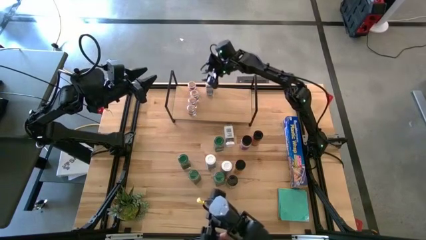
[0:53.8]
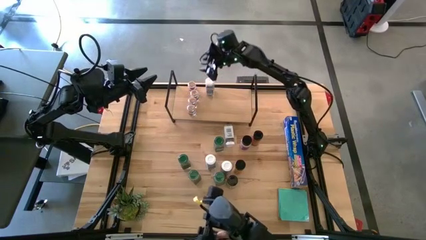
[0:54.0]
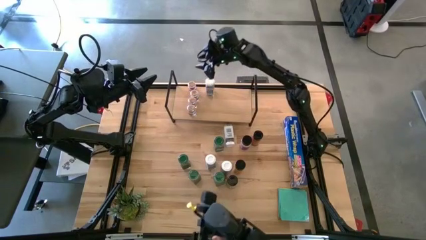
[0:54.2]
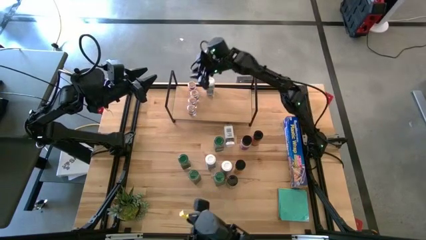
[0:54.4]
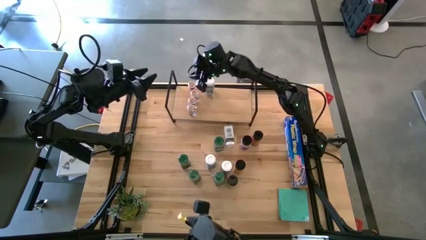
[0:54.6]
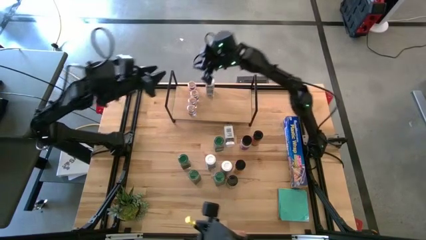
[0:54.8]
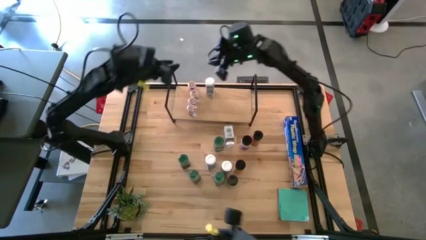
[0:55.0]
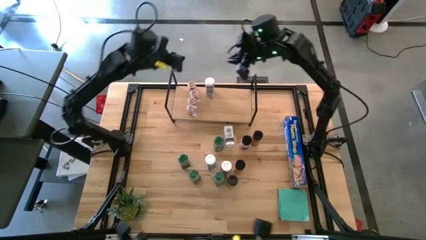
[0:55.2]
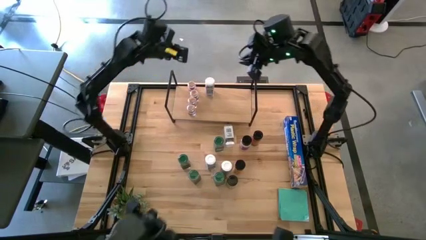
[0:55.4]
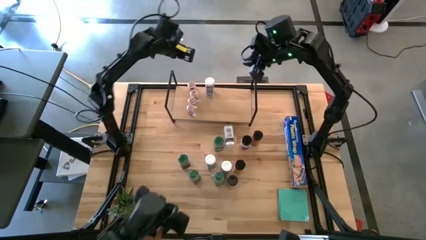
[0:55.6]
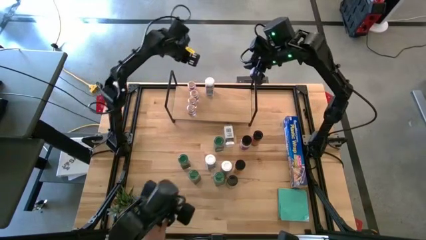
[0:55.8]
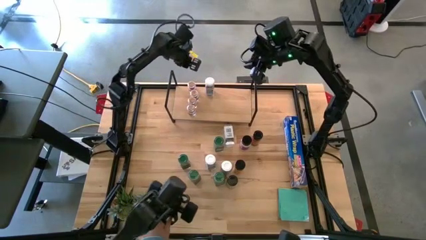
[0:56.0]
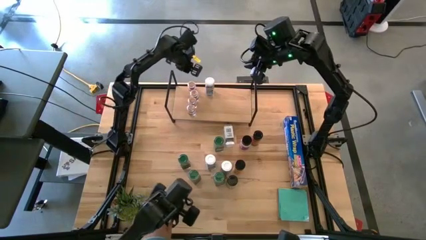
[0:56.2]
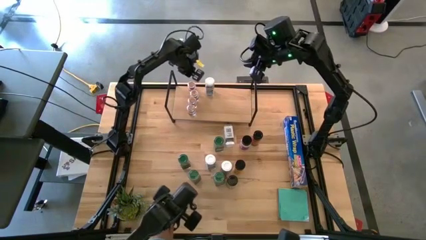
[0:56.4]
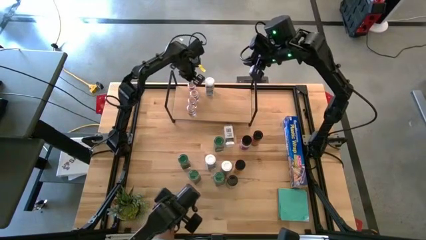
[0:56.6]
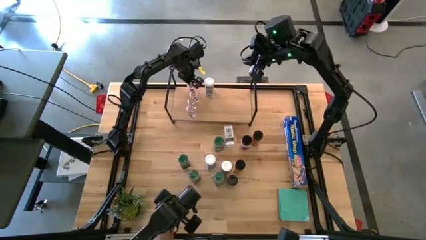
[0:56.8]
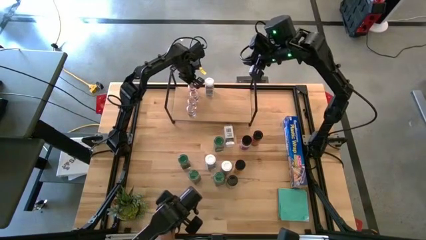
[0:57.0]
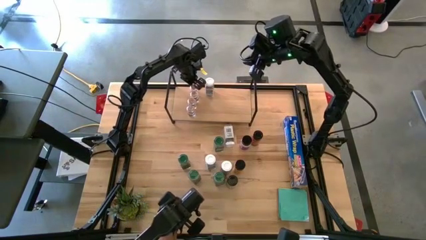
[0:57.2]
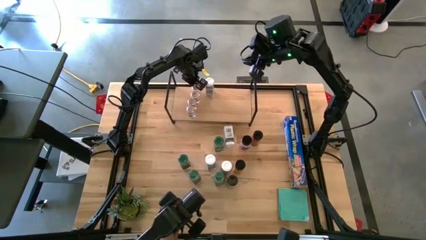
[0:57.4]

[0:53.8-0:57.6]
Task: Shelf spices
Adjust the brown seasoning bottle on the shelf

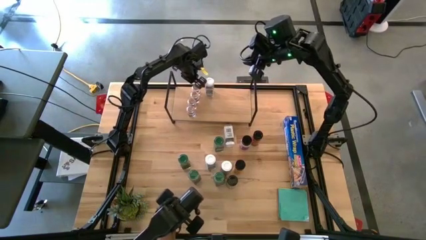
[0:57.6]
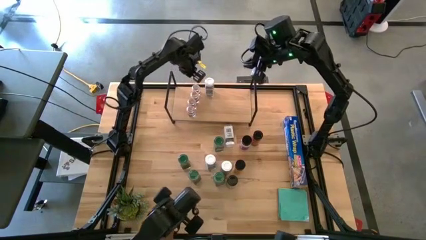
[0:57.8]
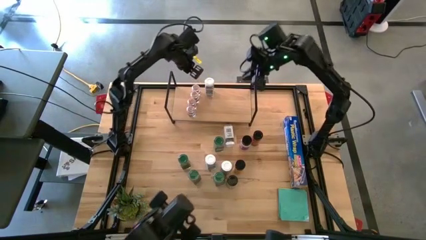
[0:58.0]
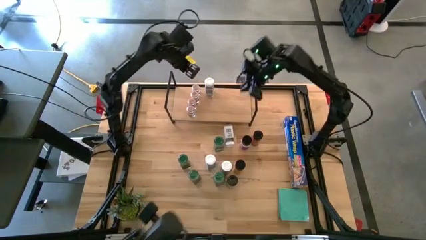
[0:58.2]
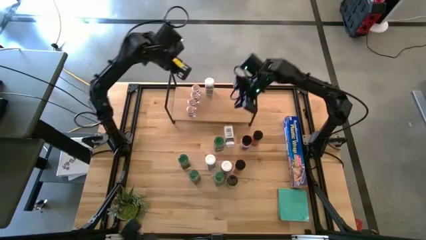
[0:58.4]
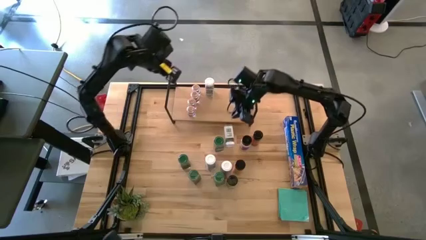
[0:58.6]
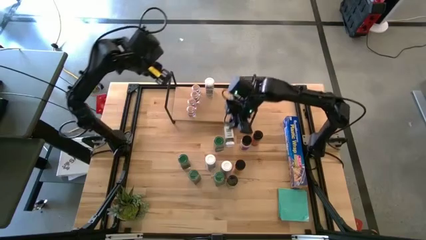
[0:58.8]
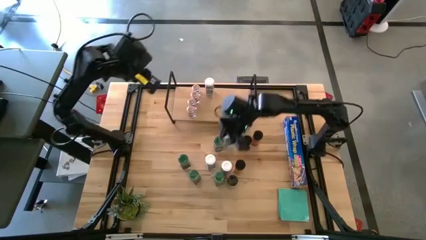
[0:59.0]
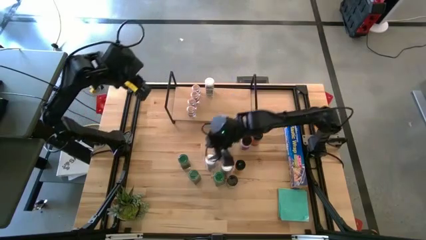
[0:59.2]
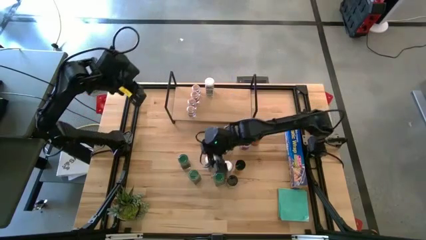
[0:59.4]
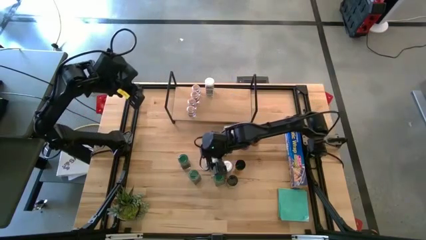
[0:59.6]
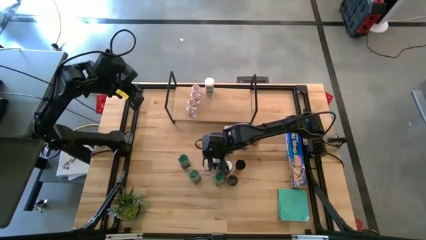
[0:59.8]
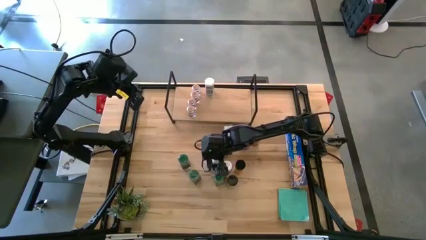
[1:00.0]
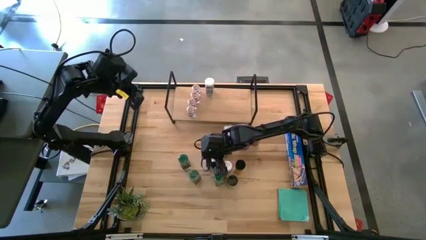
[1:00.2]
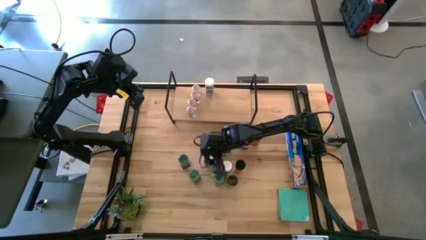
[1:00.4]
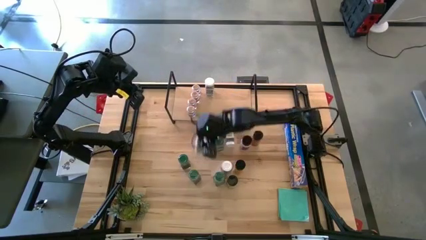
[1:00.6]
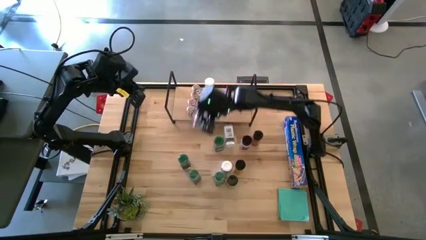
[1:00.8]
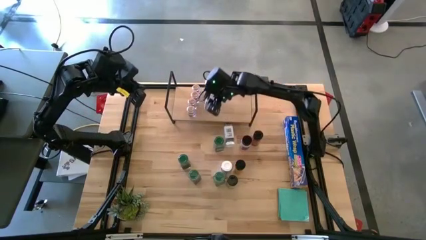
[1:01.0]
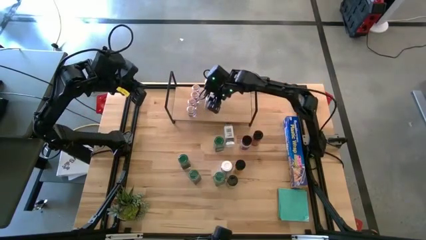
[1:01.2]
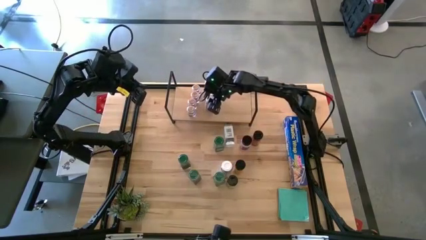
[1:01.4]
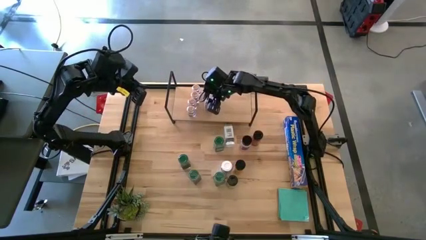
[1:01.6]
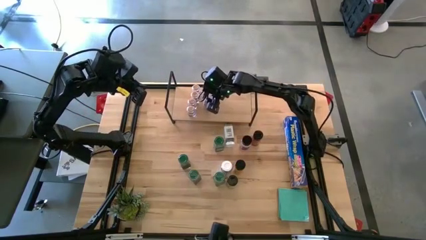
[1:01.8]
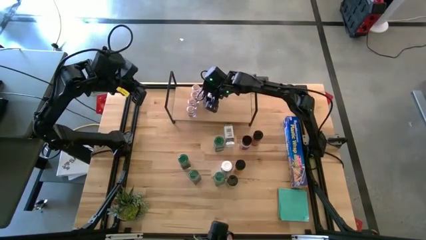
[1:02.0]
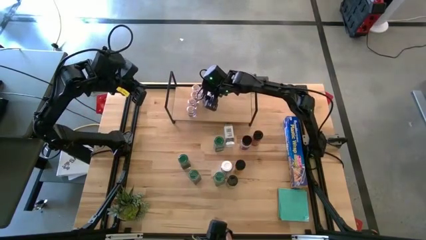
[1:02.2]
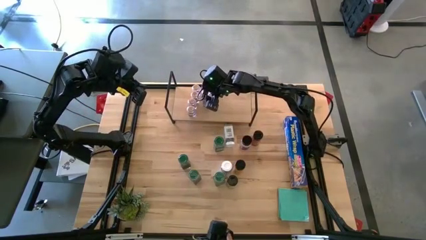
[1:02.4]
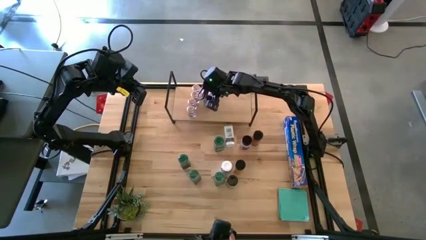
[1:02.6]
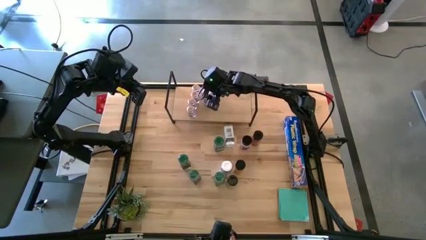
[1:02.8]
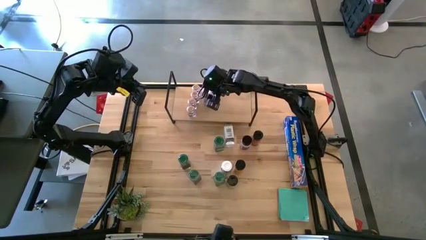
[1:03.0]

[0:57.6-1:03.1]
Put the bottom left white seasoning bottle on the shelf aligned with the other white seasoning bottle

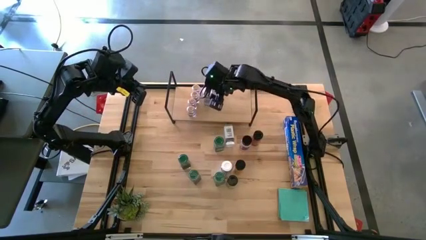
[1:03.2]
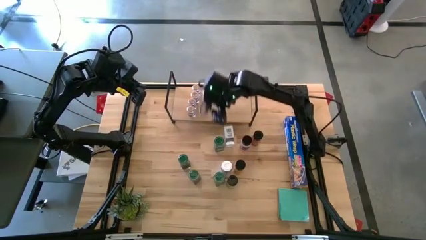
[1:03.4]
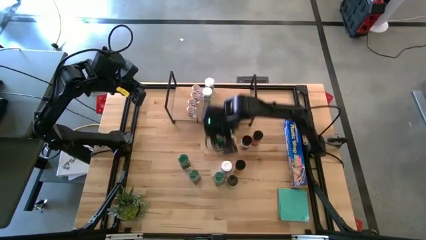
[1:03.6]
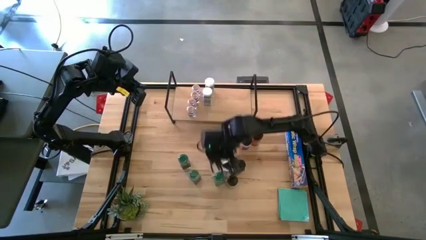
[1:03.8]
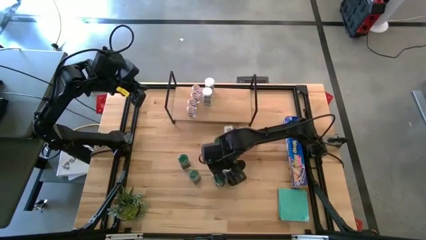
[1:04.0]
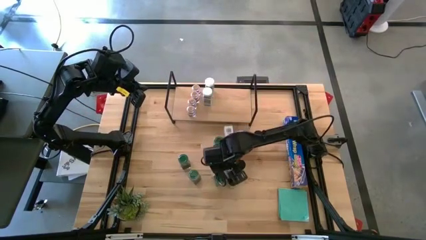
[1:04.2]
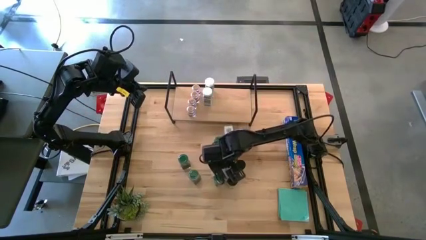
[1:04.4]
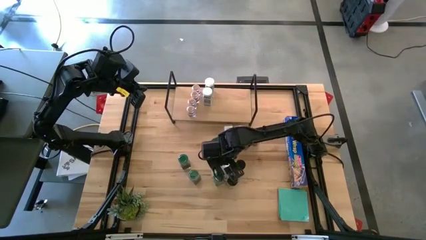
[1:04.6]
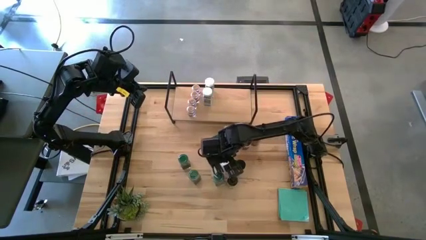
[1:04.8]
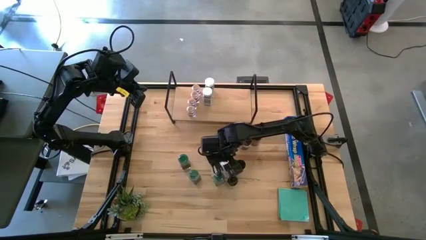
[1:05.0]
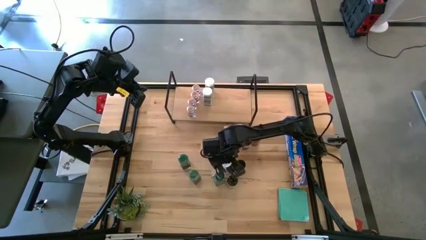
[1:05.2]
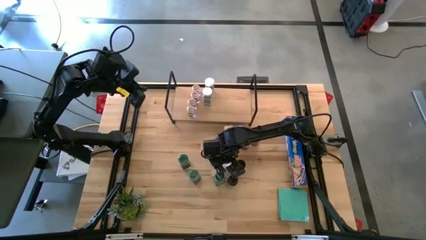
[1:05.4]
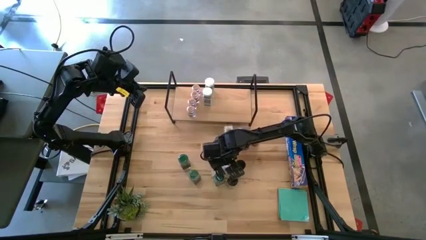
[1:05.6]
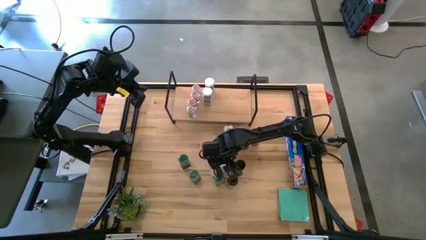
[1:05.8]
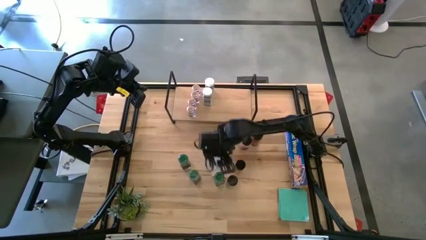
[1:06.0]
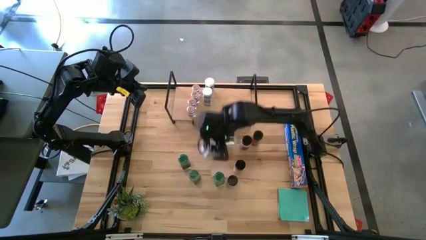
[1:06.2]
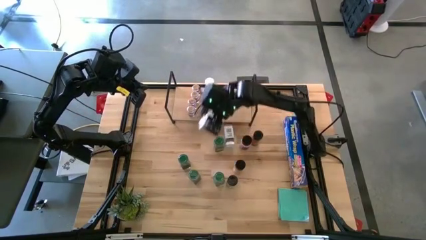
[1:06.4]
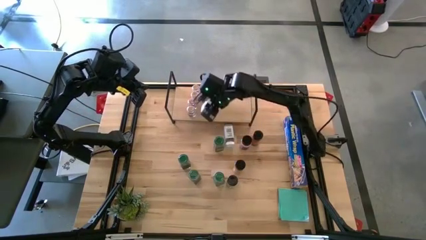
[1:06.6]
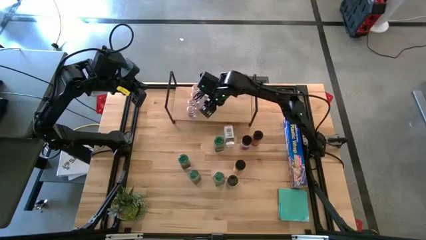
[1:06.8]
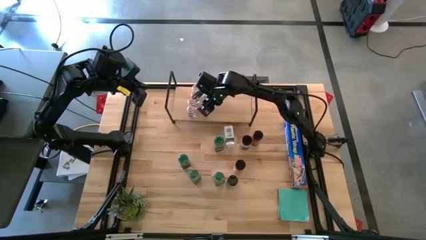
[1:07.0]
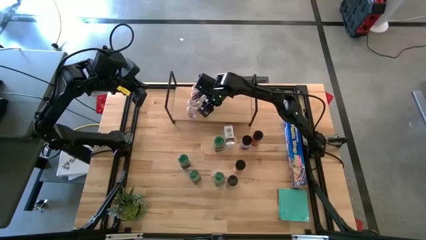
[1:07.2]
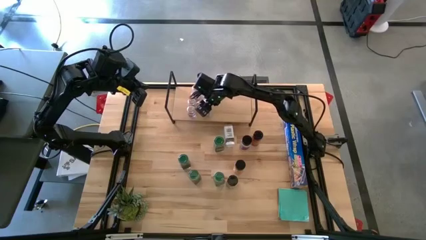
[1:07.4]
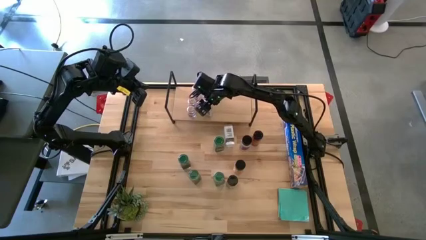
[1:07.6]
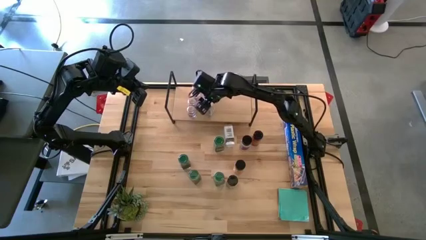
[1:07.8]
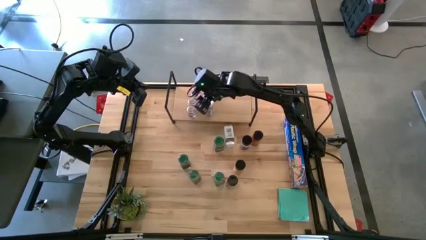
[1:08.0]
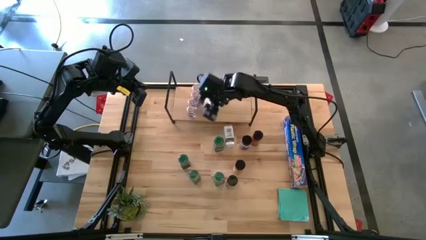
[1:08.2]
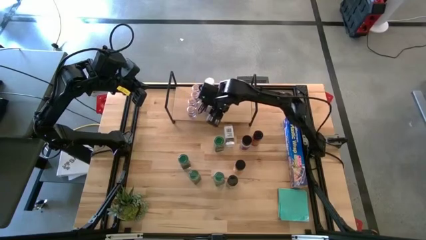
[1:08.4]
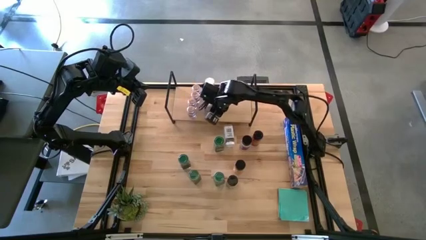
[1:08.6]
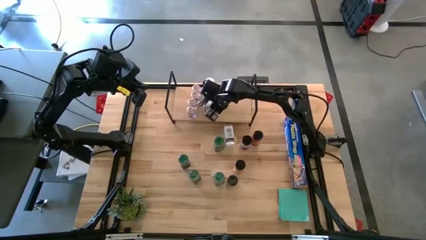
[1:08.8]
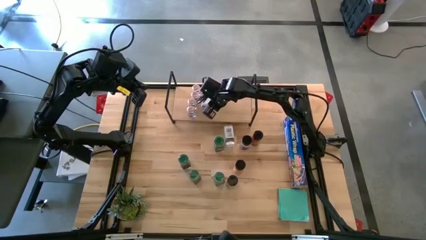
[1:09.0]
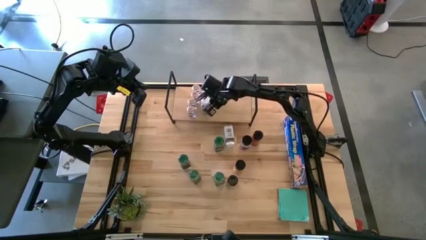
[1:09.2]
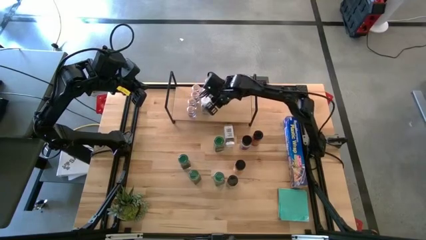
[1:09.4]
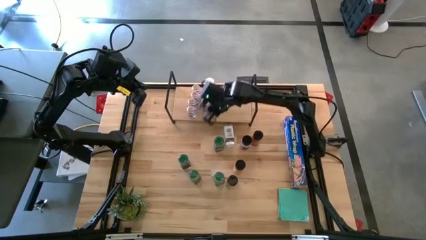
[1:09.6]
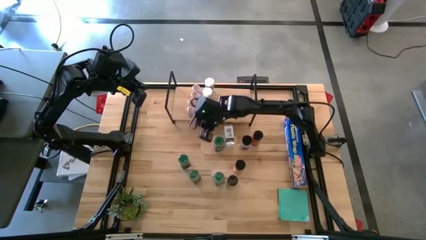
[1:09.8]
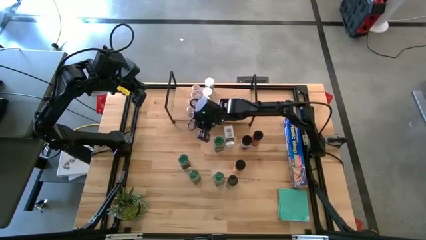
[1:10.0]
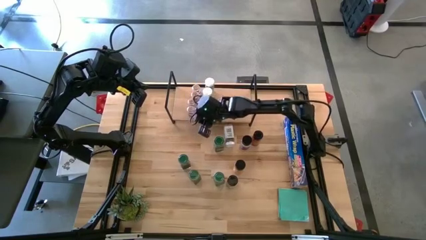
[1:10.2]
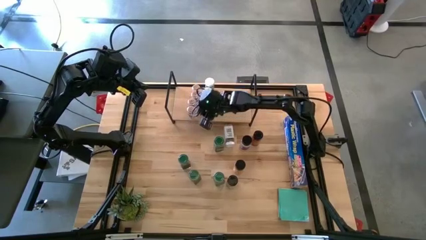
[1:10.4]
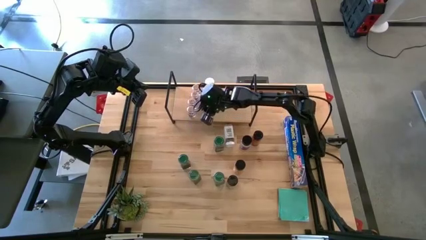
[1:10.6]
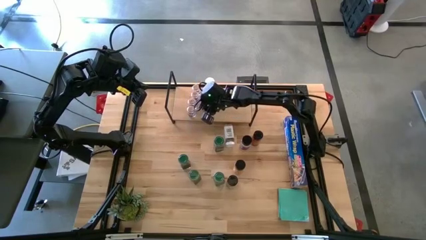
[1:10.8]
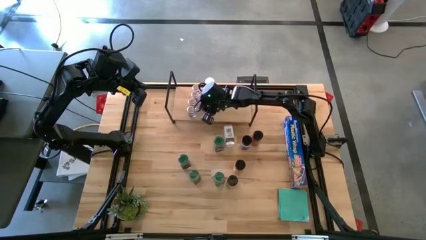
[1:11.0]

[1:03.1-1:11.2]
Put the bottom white seasoning bottle on the shelf aligned with the other white seasoning bottle
